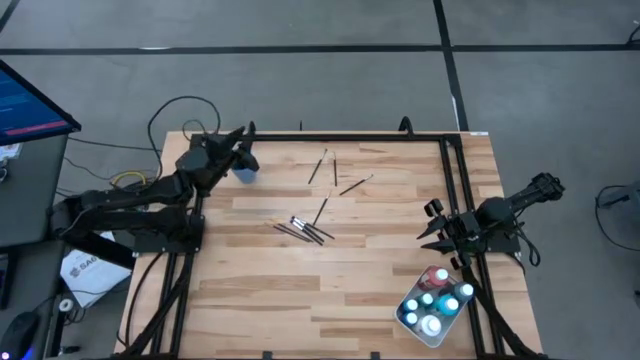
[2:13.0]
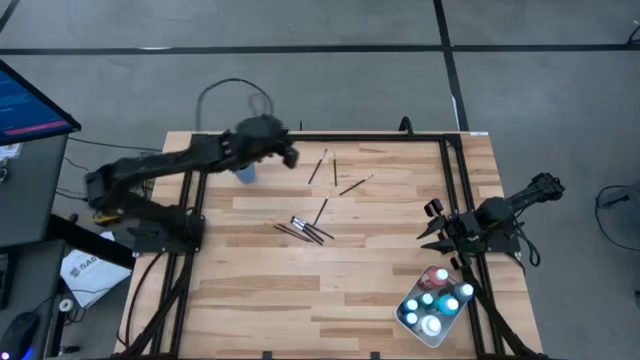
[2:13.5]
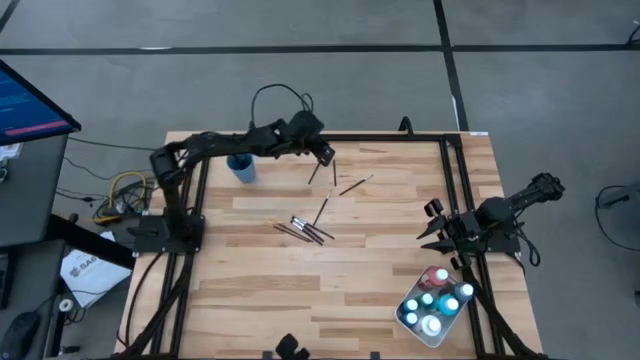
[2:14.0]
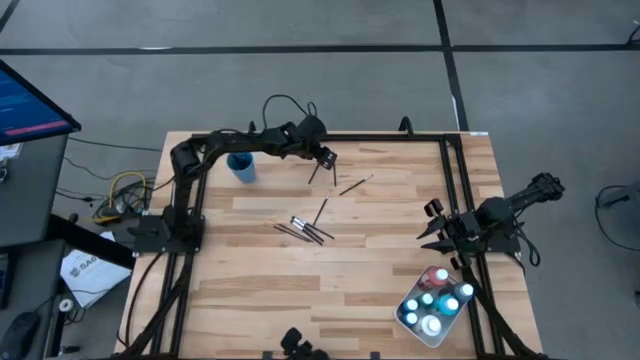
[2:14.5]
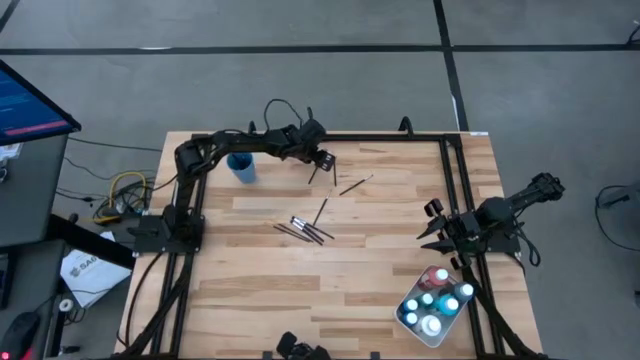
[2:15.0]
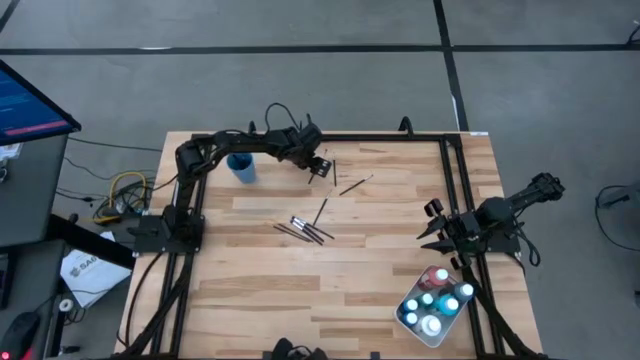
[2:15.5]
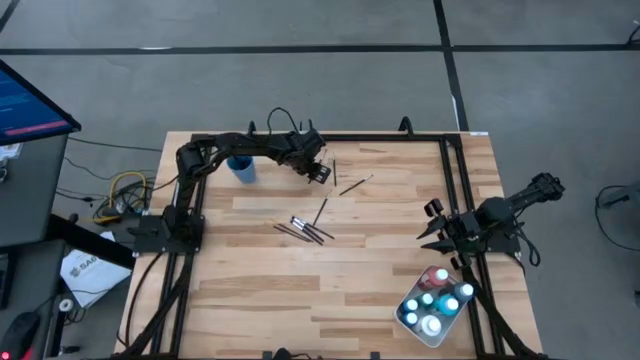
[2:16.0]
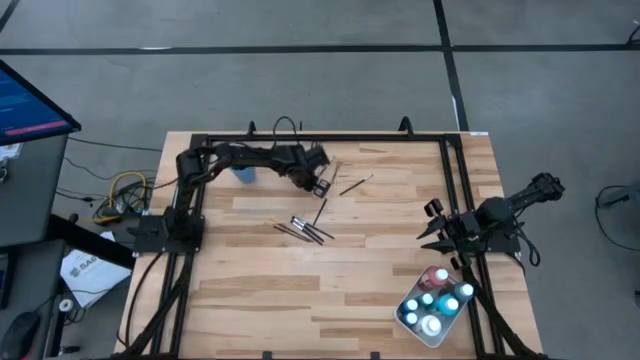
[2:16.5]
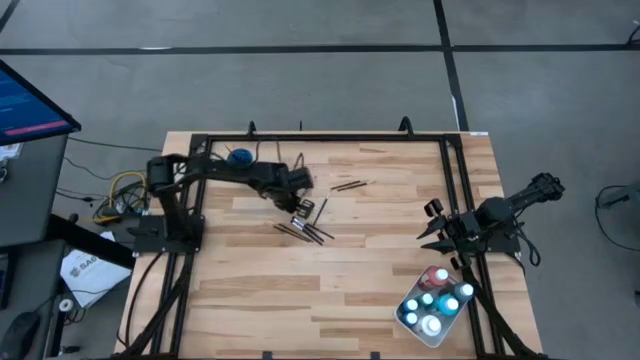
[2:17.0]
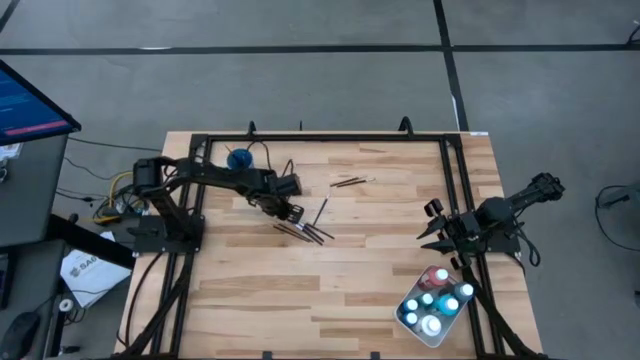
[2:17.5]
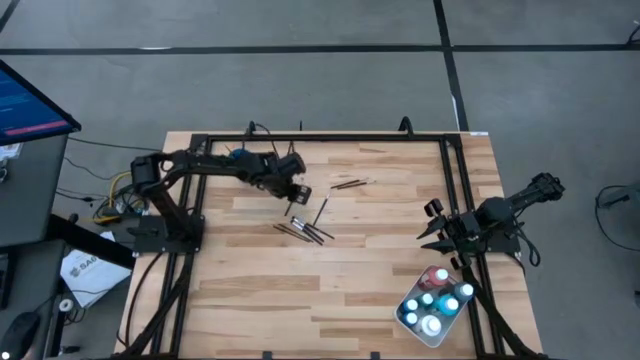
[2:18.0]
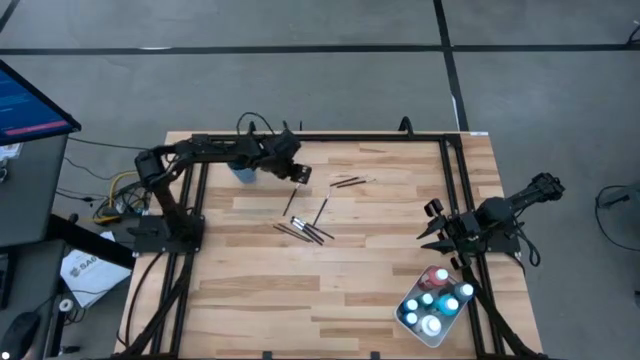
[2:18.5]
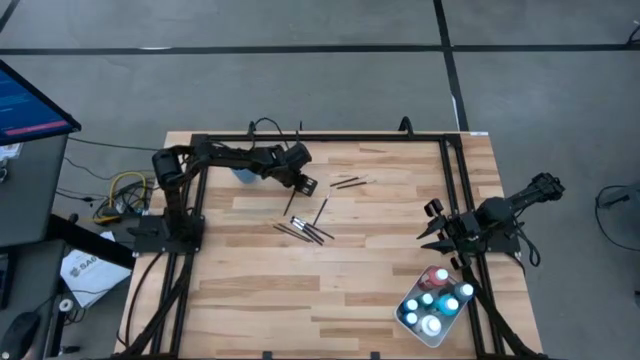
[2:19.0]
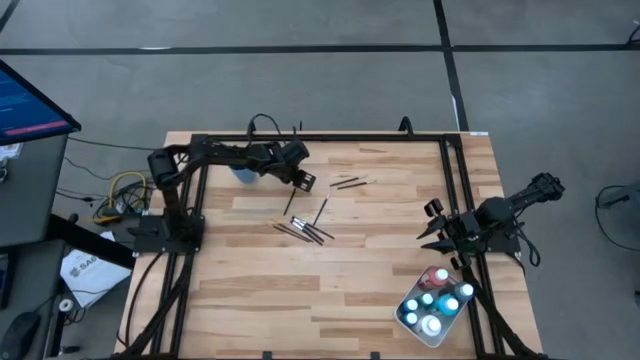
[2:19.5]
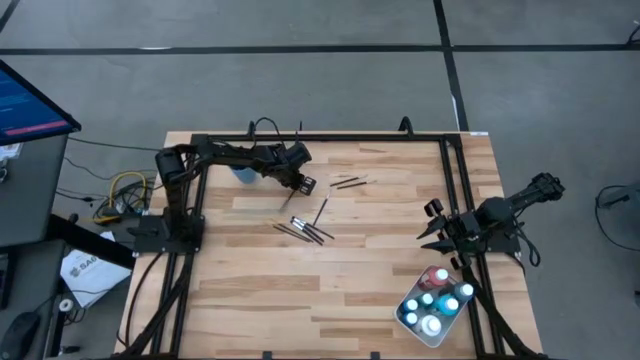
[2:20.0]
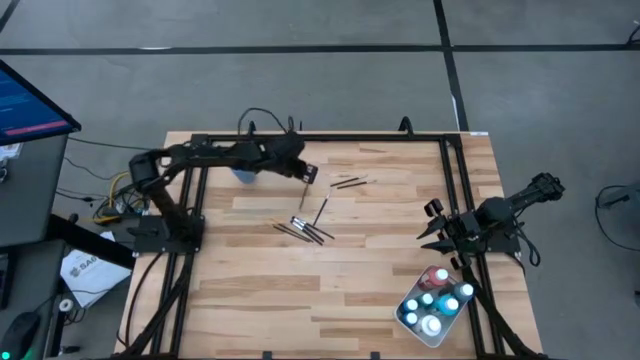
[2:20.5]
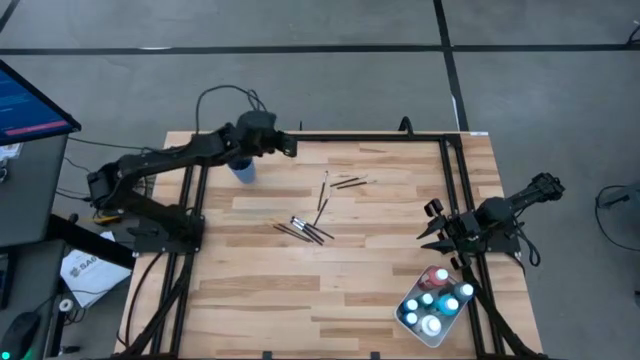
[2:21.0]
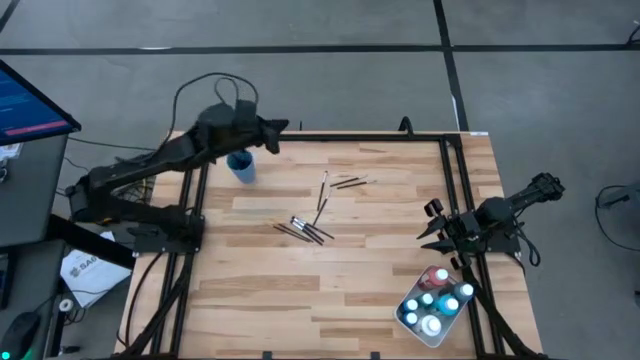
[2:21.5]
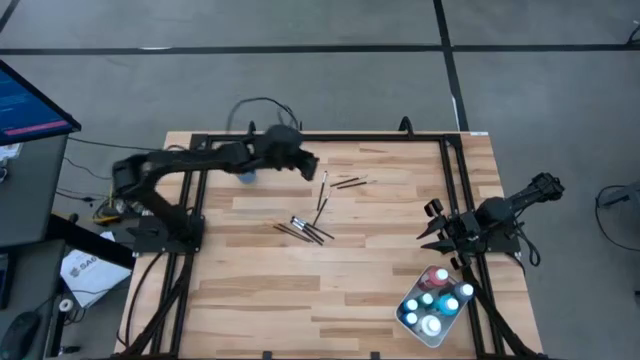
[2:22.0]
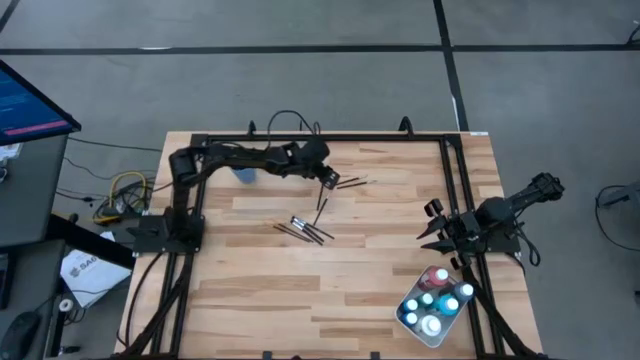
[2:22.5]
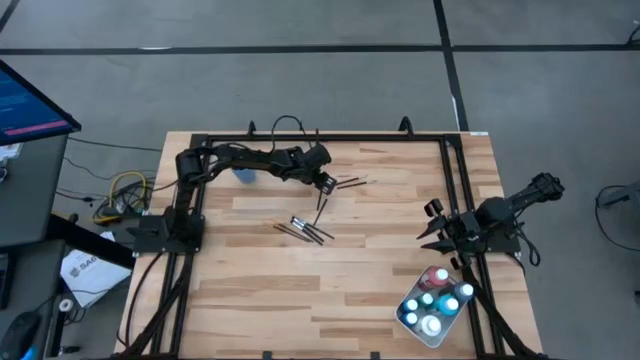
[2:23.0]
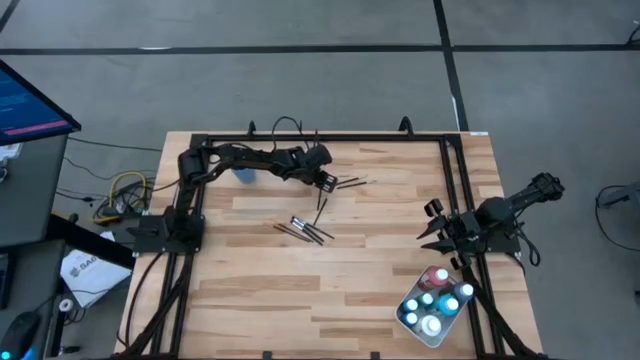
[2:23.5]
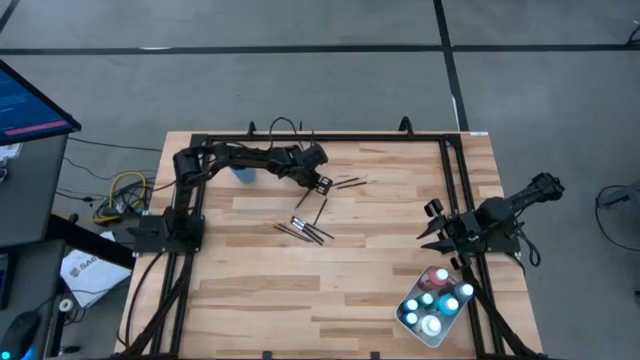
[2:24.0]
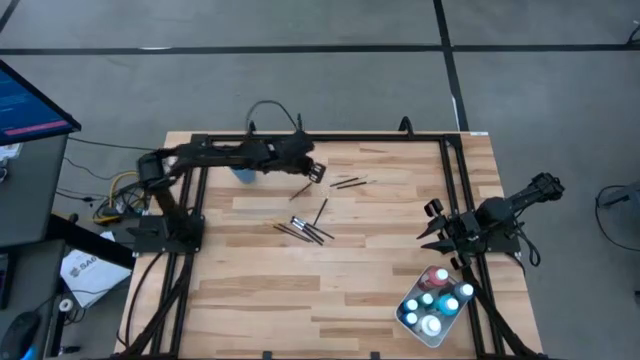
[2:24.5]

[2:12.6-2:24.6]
Task: Pick & Place Paint Supplies
Put the silver paint brush into the blue cup

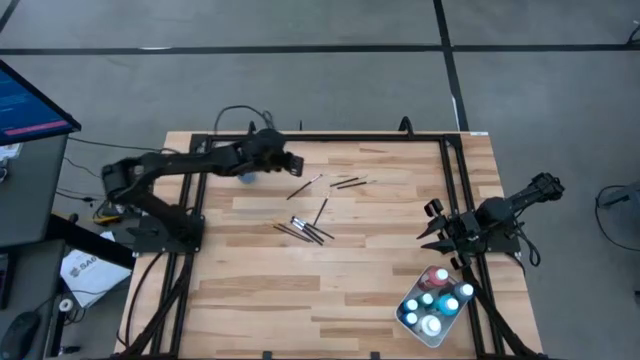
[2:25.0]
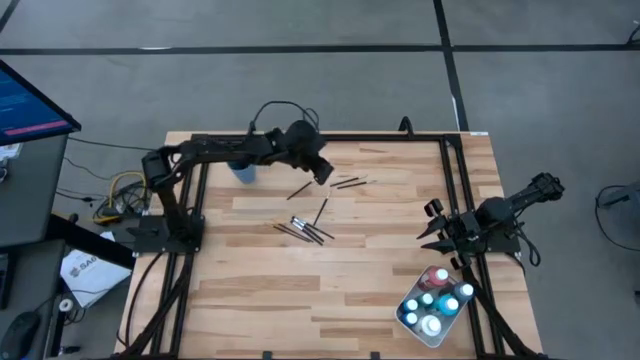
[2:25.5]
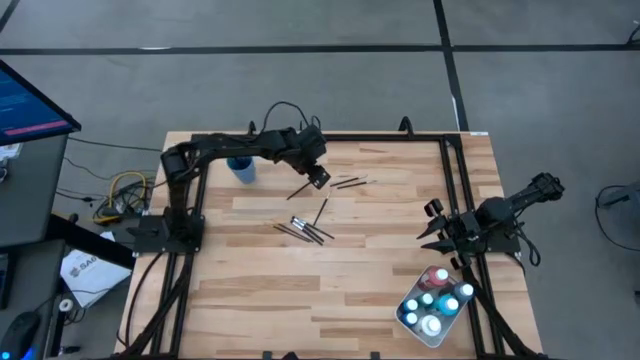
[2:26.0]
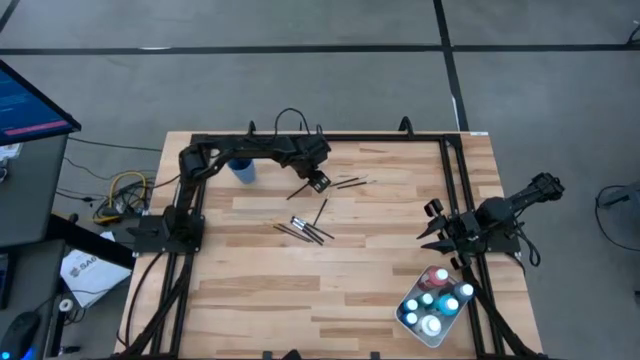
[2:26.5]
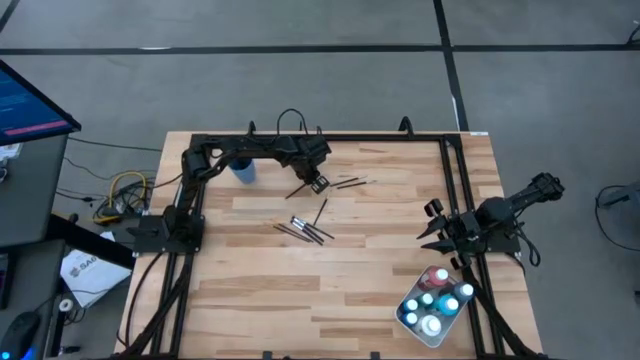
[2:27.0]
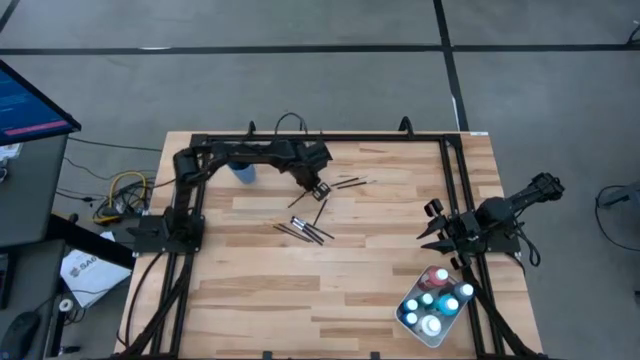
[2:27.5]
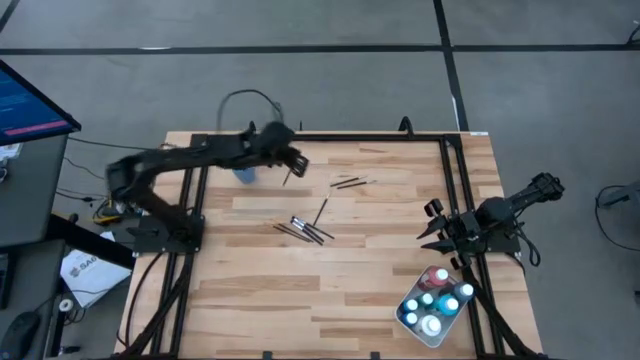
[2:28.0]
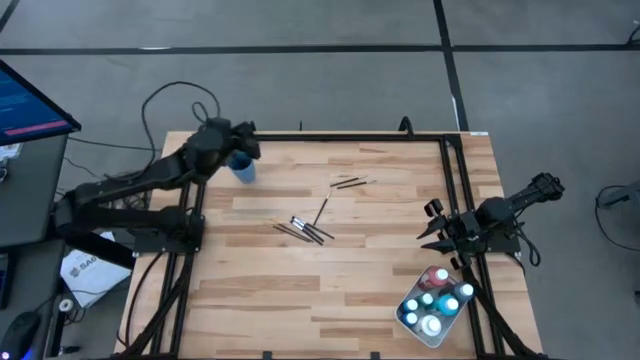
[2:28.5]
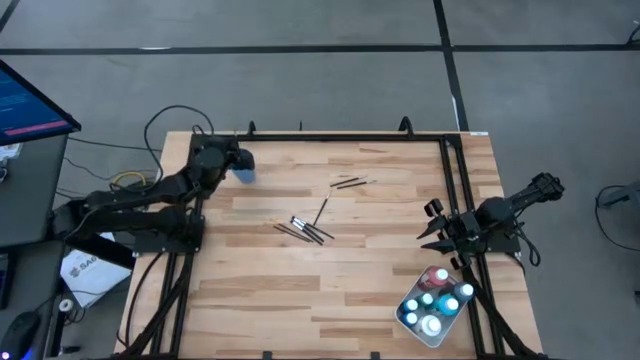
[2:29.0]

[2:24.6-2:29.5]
Put the silver paint brush into the blue cup

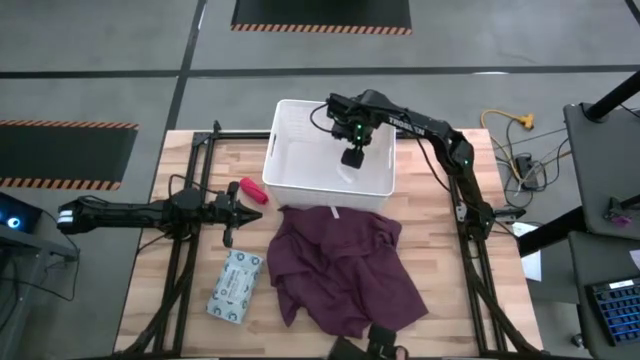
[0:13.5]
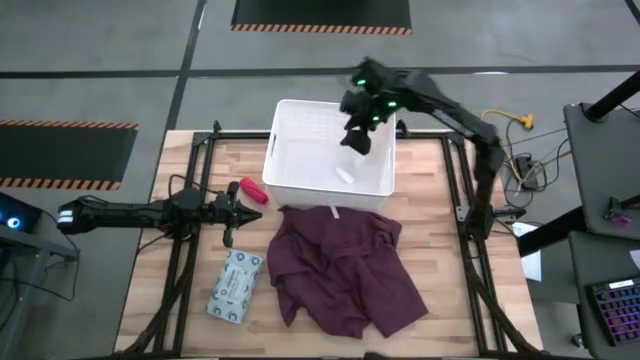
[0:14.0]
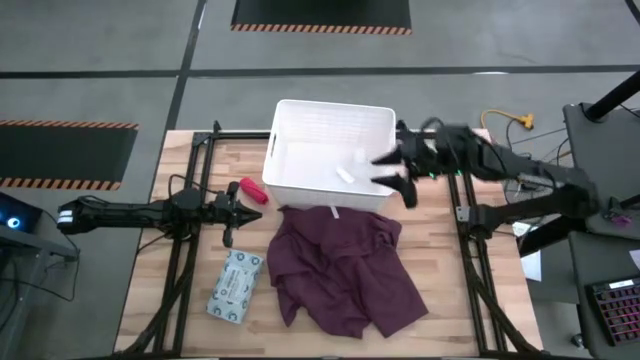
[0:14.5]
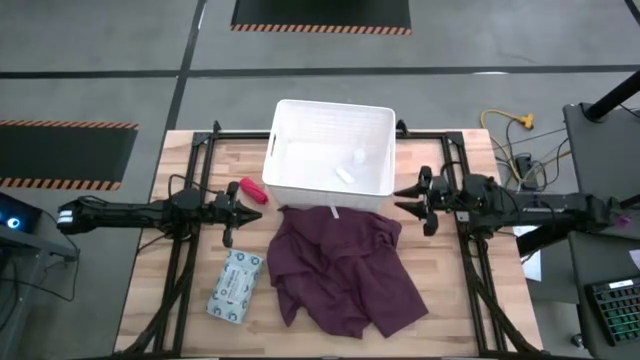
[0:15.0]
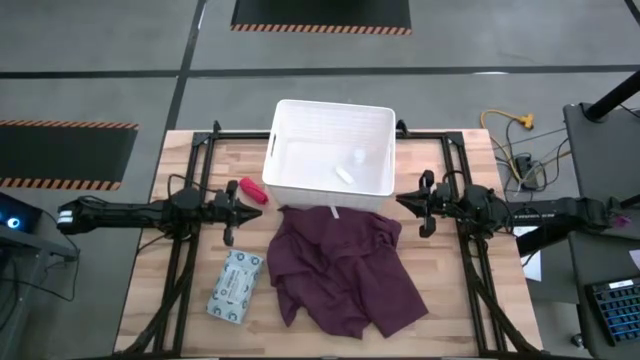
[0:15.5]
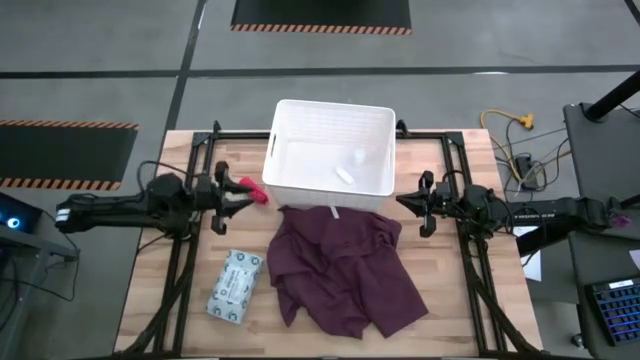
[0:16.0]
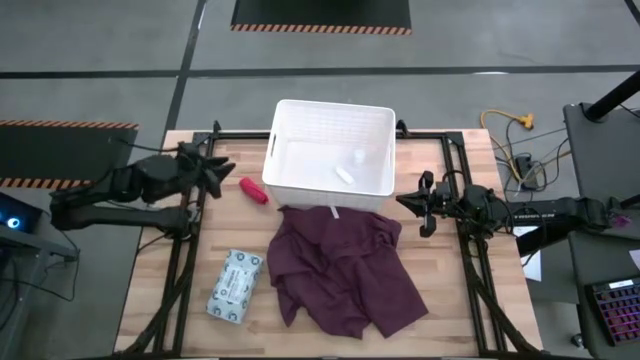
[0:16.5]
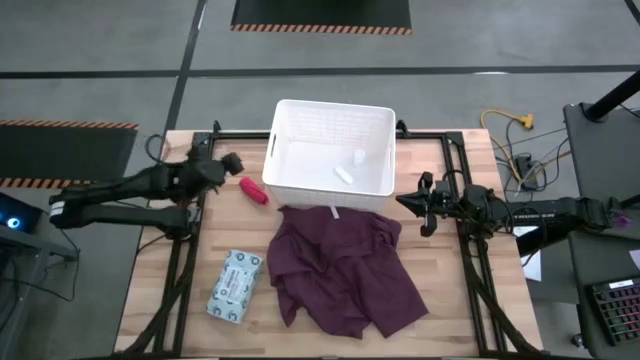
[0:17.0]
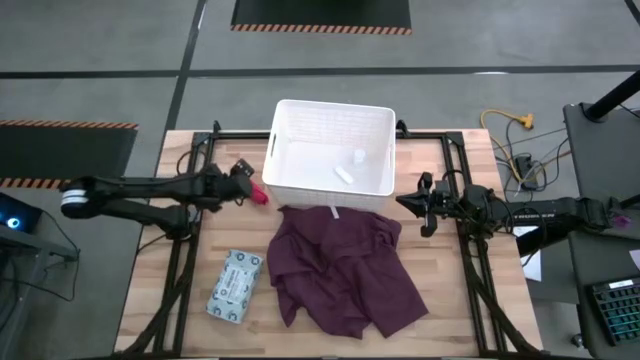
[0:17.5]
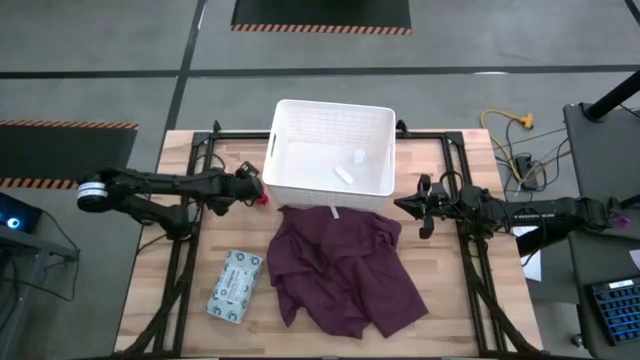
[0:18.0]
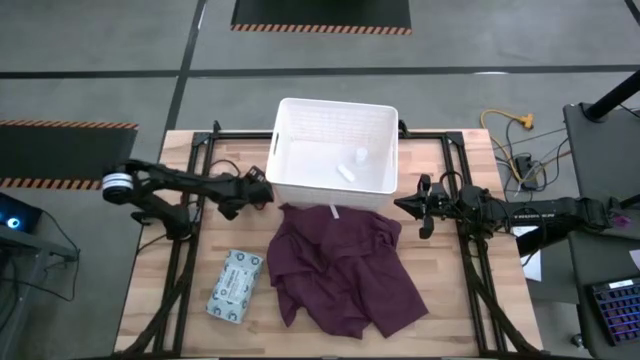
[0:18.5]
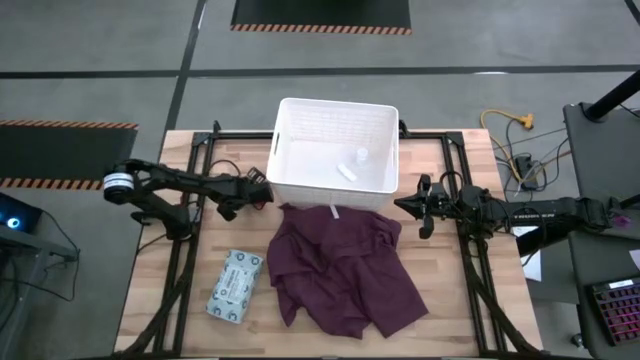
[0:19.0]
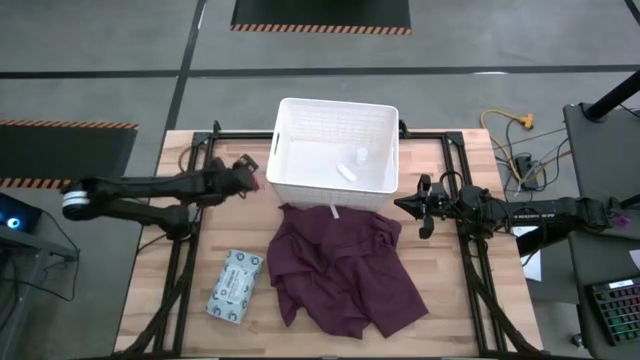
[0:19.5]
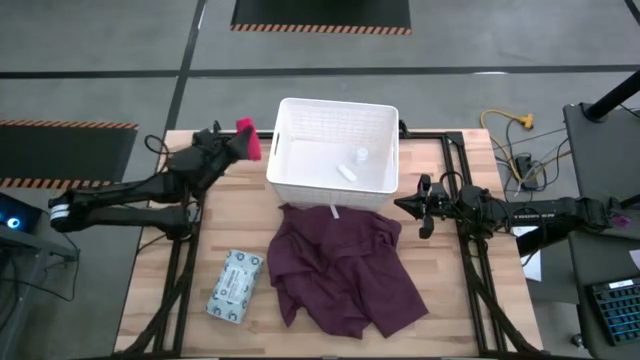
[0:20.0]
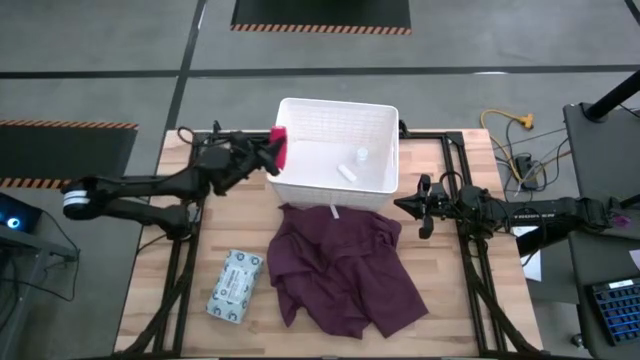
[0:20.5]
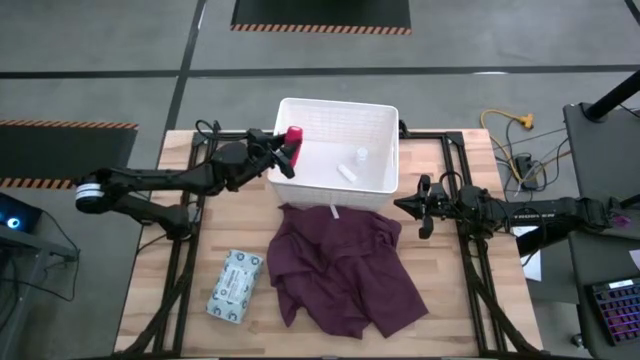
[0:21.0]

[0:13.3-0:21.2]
Task: Pick & place medical supplies in basket/bin
Put the red bandage into the white basket
